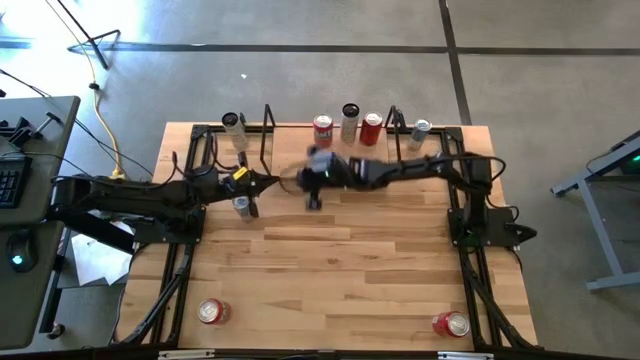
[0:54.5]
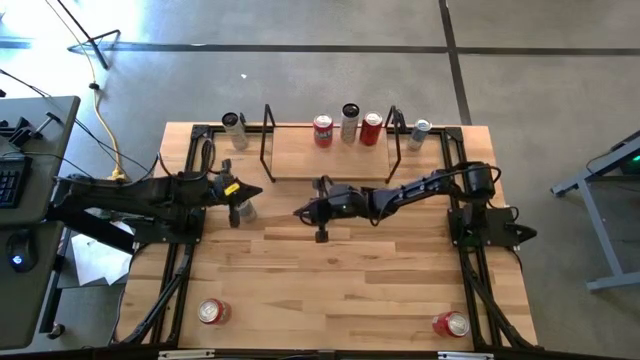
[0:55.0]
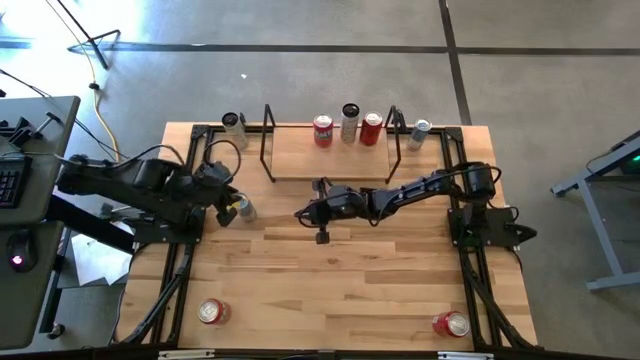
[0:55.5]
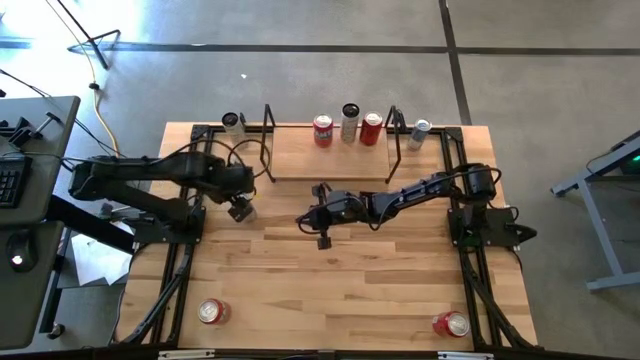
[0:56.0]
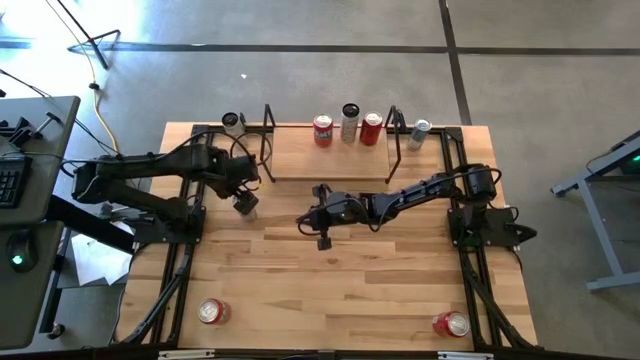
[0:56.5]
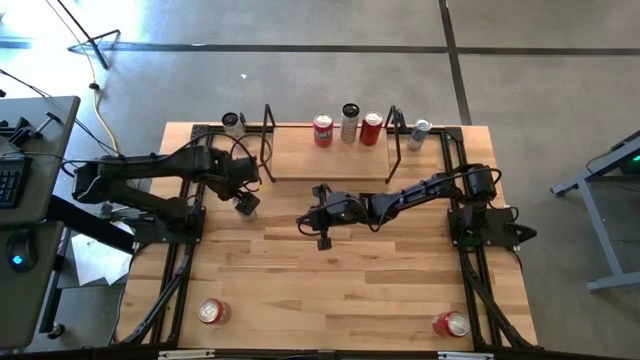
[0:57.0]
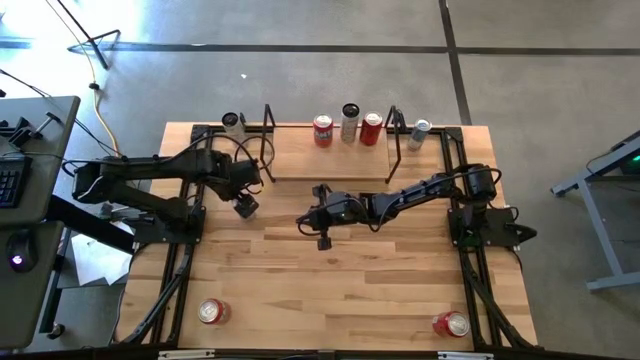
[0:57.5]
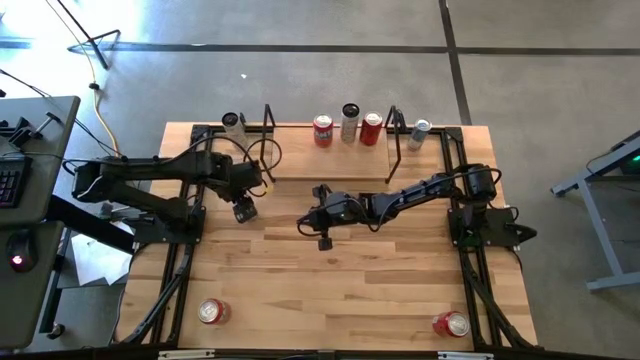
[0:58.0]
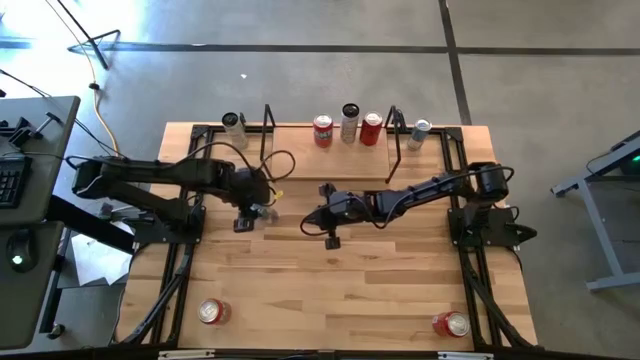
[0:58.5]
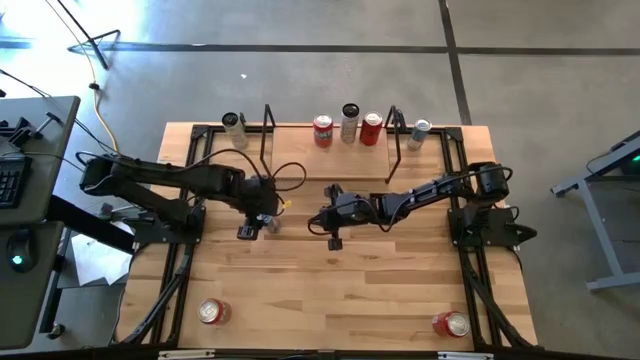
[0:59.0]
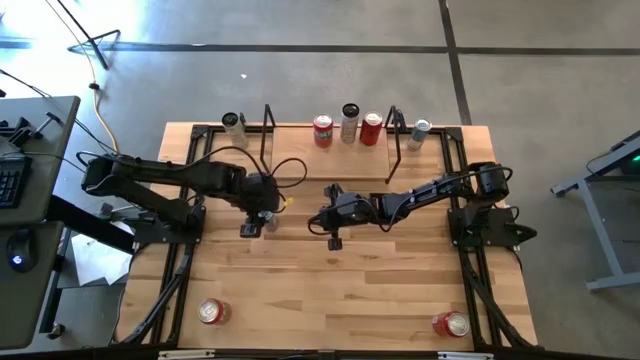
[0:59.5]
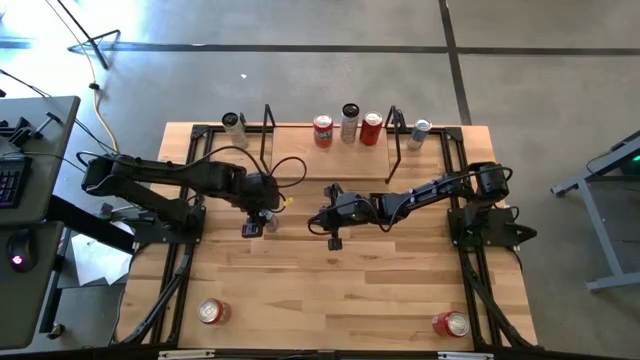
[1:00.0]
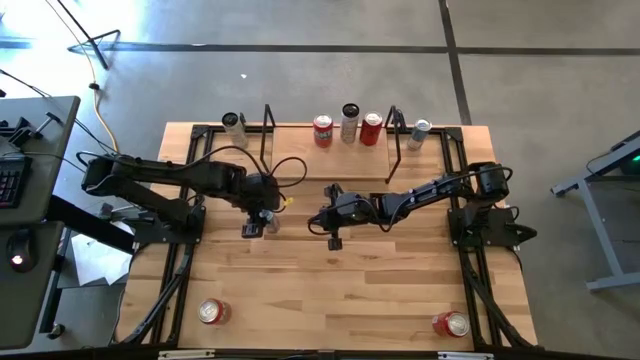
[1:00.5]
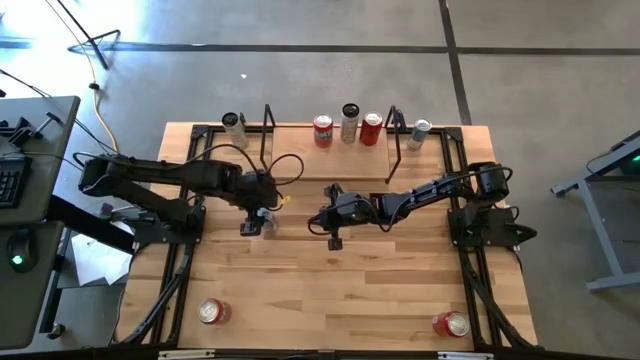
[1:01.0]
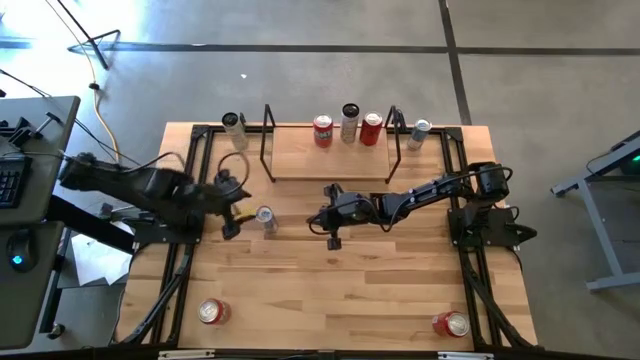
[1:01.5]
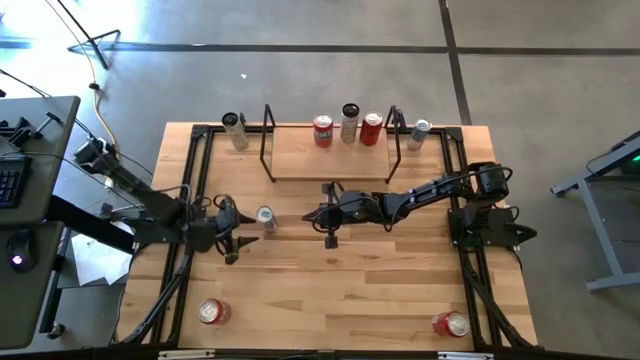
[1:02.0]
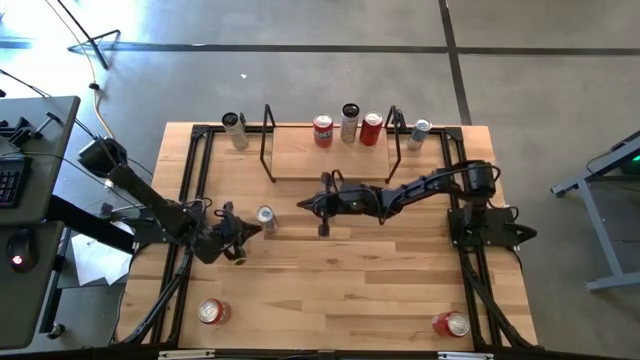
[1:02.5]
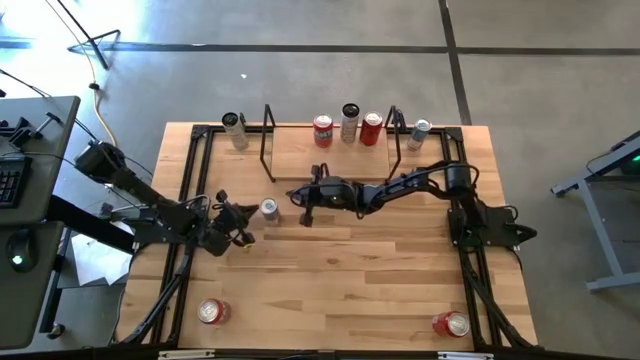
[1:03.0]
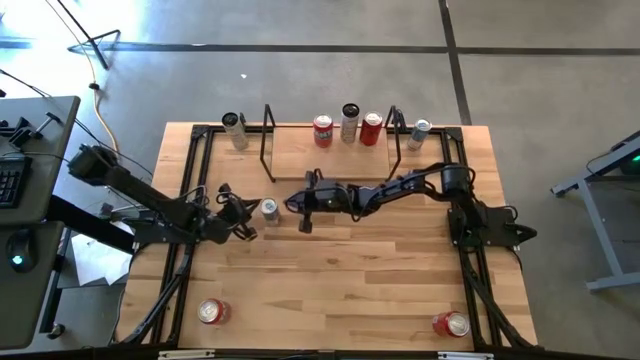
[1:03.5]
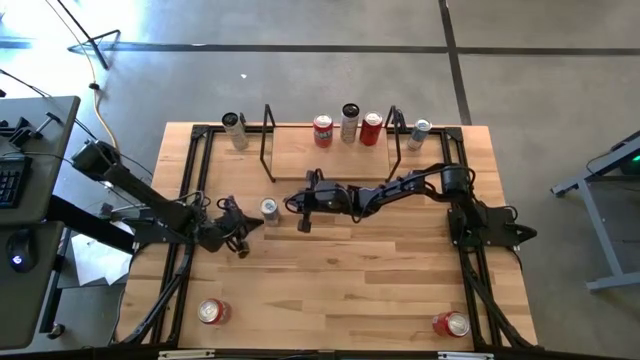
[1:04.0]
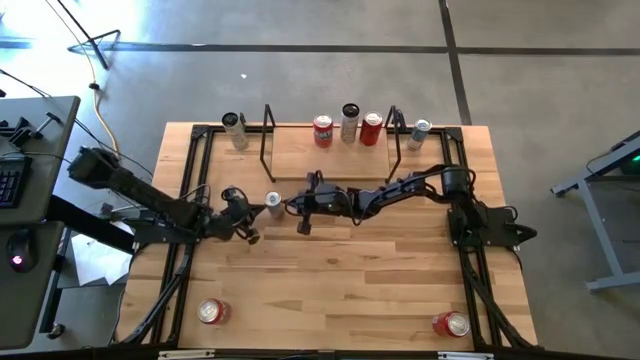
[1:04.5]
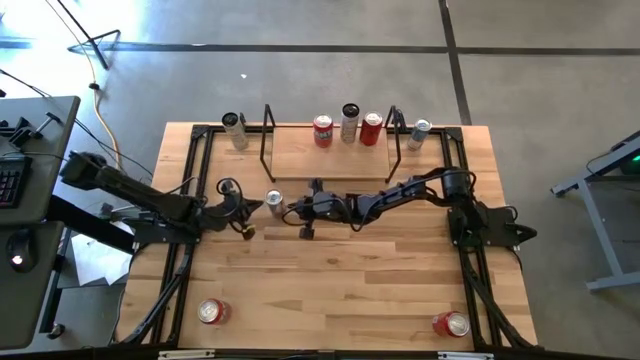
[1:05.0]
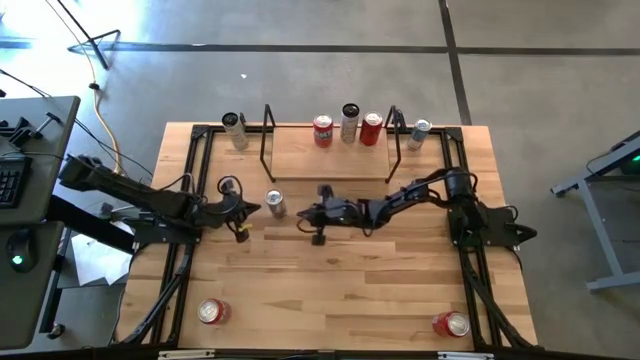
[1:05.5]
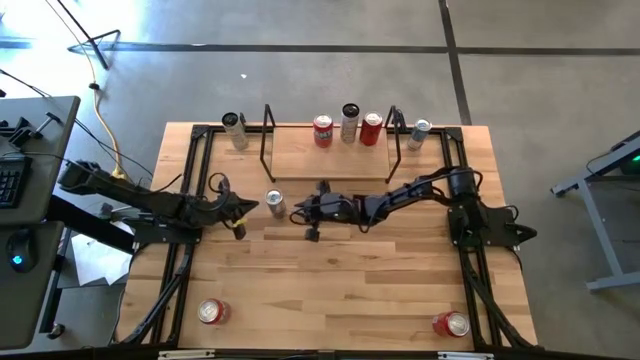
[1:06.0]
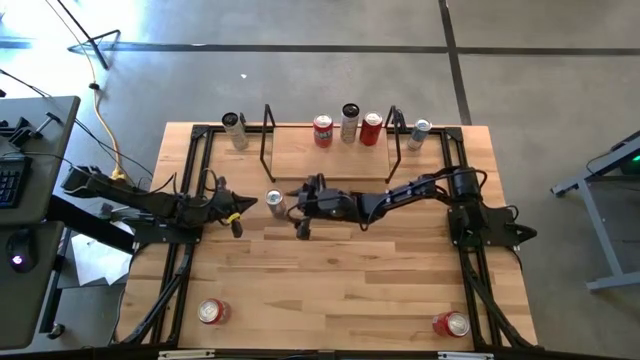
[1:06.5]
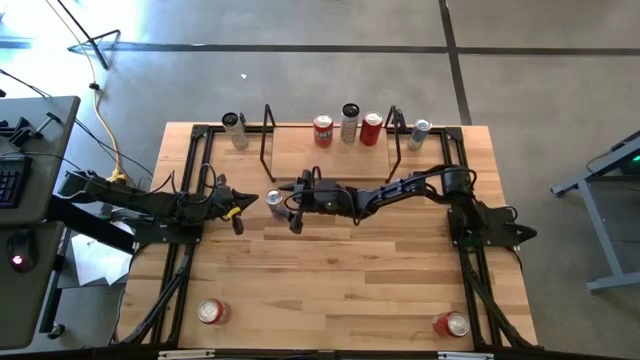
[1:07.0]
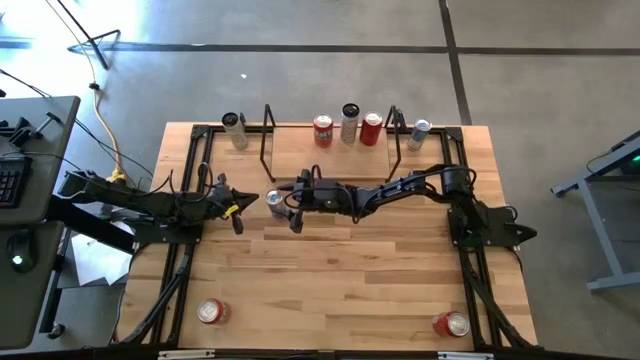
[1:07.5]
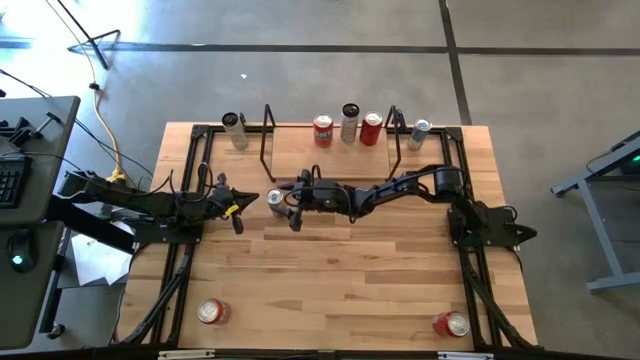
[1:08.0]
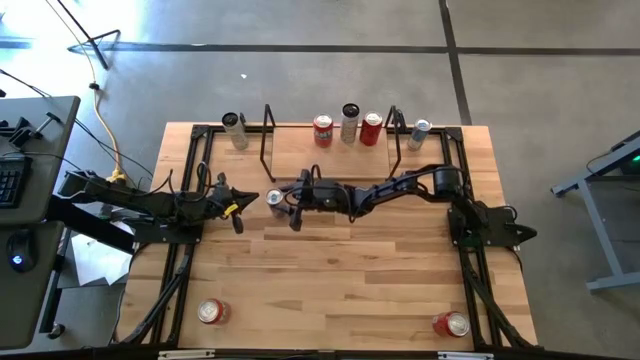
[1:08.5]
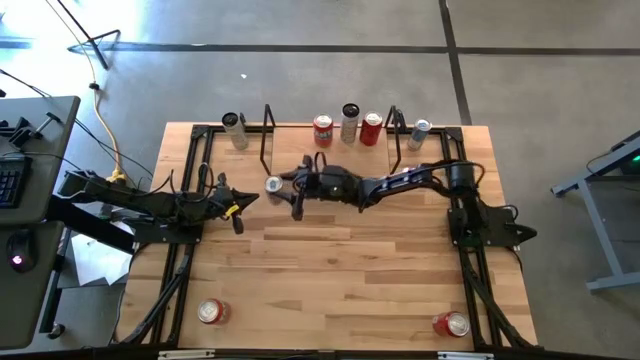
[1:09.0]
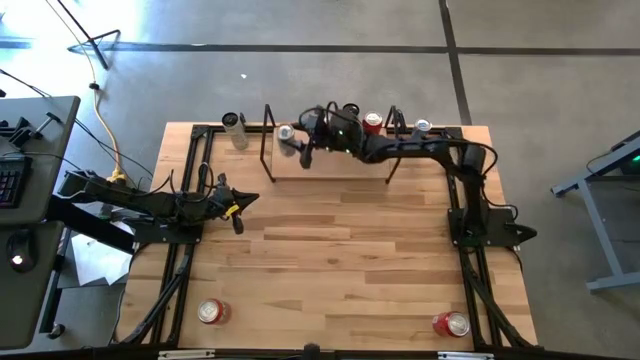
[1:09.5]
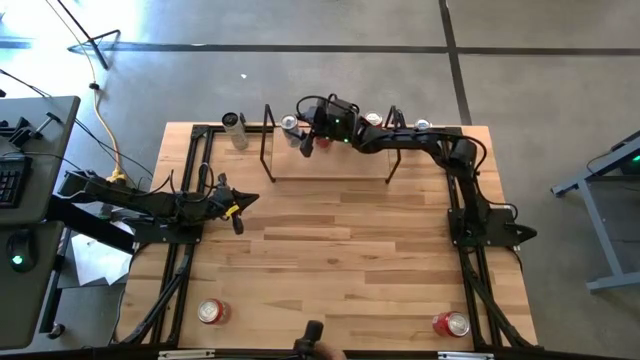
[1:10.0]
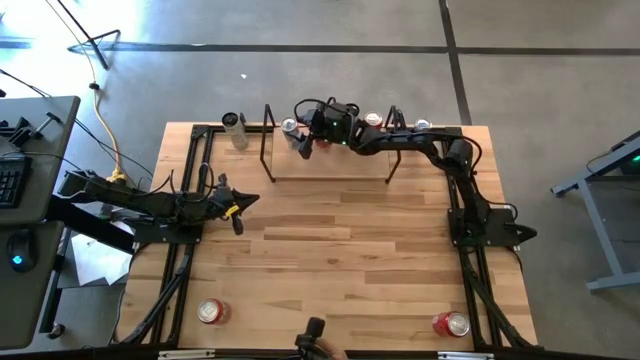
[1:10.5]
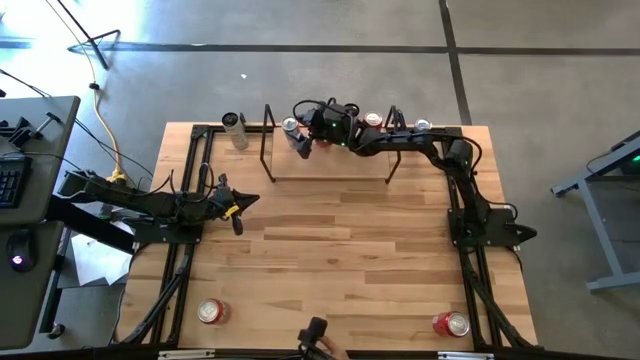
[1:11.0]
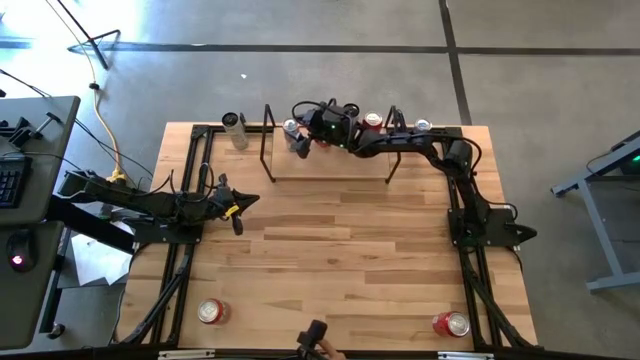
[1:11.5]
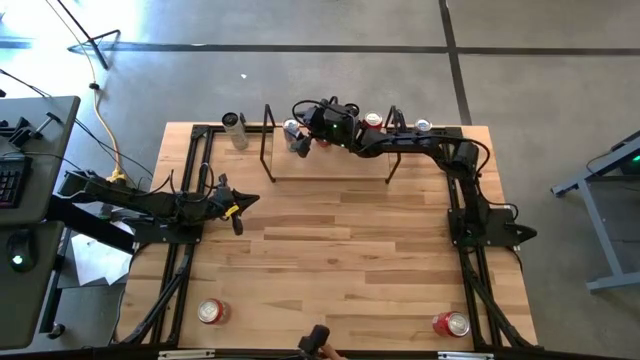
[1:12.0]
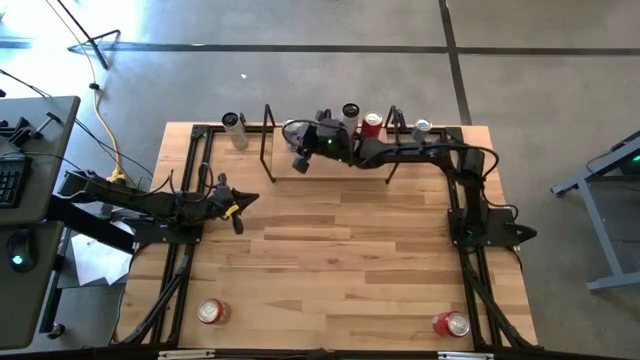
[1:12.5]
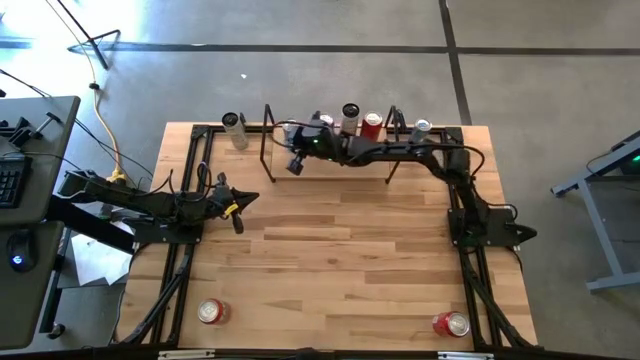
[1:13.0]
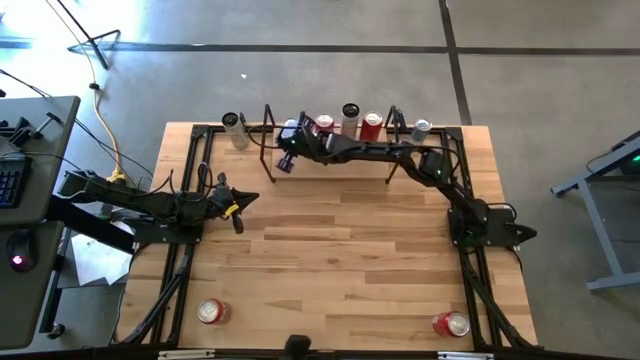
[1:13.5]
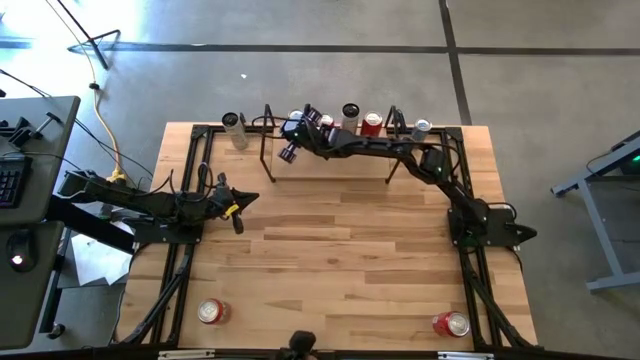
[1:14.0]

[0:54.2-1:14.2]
Task: Place canned beverage on shelf
Put the bottom blue soda can on the shelf

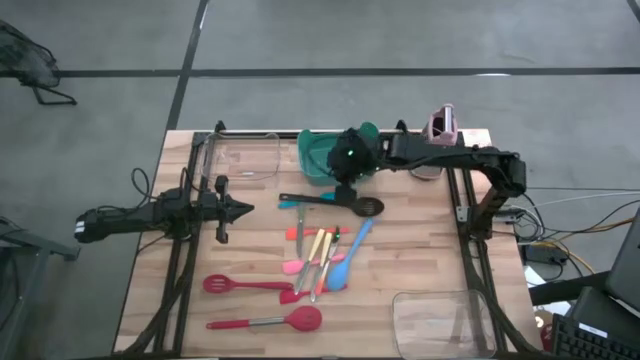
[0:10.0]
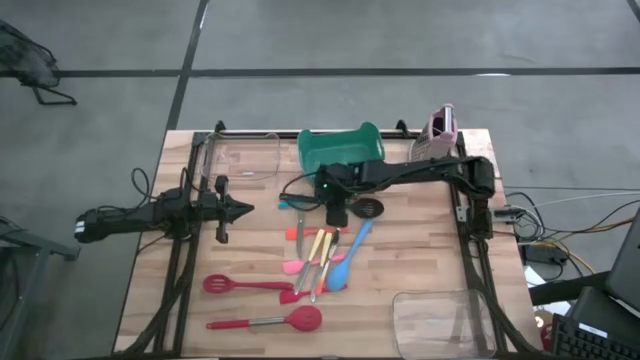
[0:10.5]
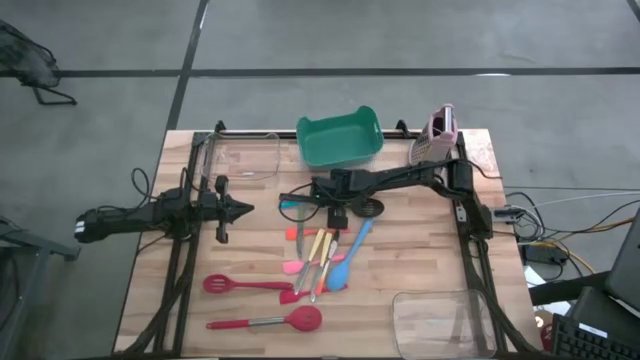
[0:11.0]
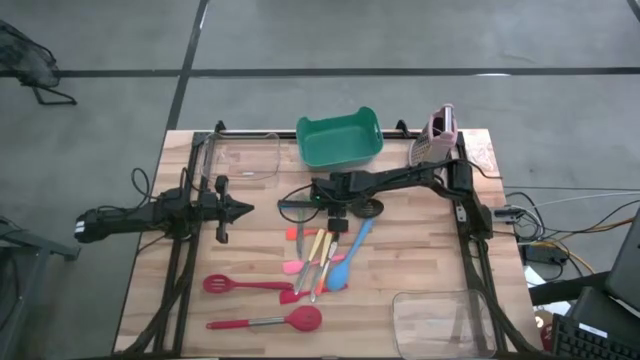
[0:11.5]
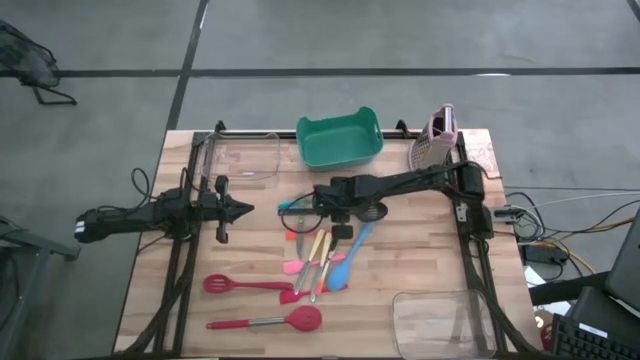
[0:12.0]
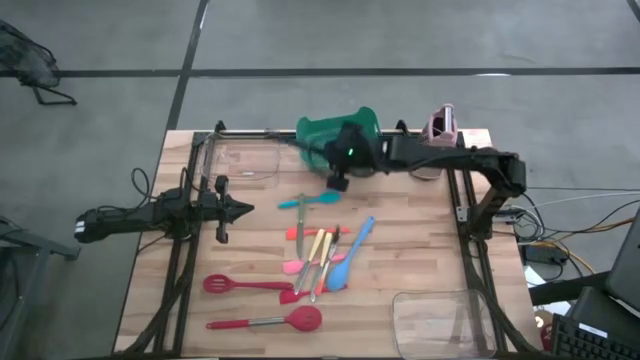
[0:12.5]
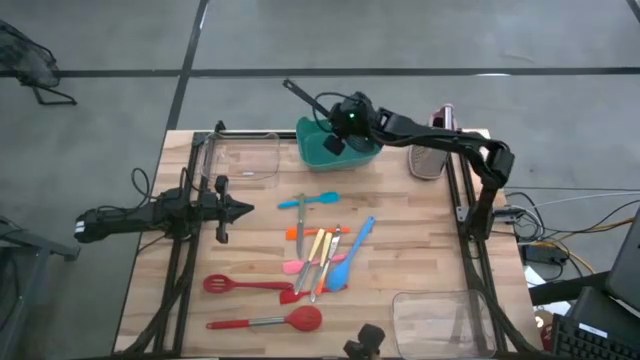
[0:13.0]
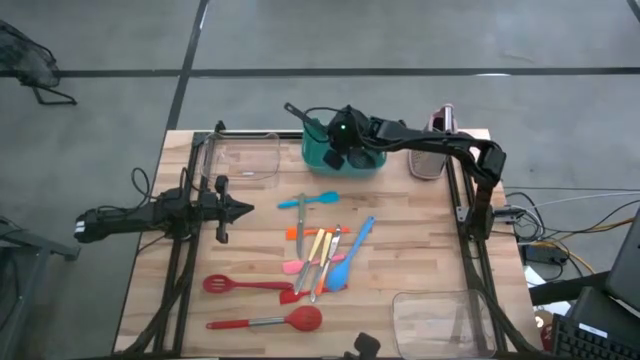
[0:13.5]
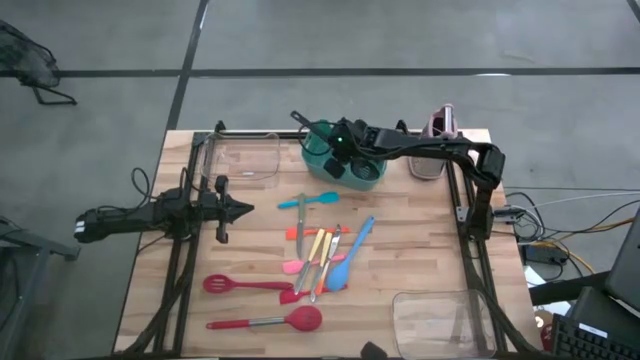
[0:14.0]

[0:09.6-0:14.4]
Task: Pick & Place Kitchen Items
Put the bottom right black saddle into the green bin
